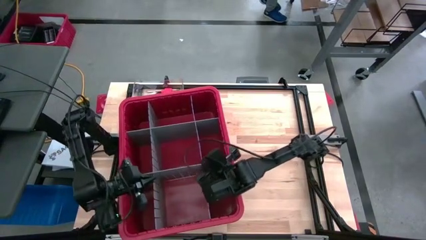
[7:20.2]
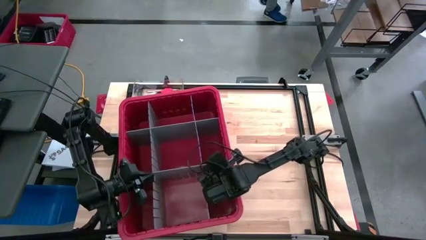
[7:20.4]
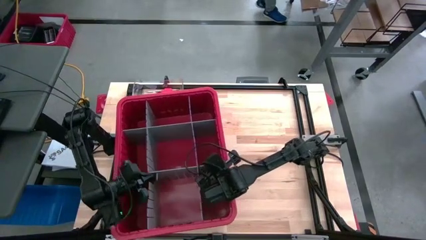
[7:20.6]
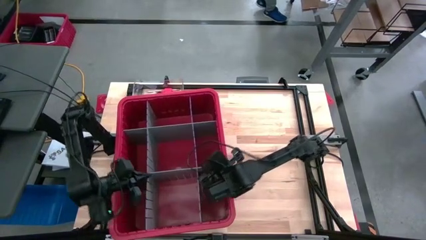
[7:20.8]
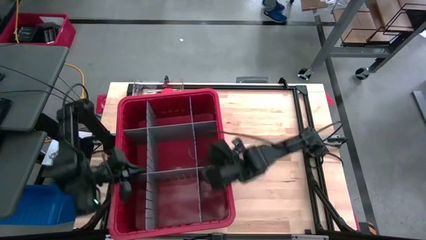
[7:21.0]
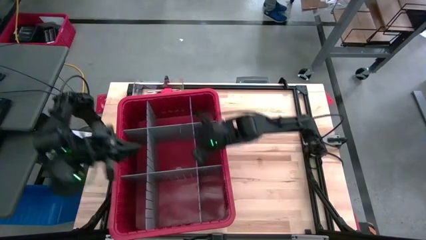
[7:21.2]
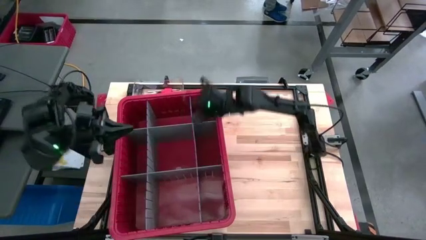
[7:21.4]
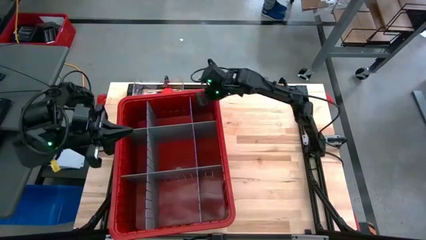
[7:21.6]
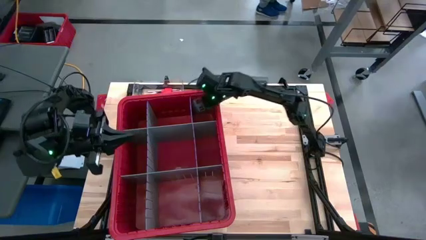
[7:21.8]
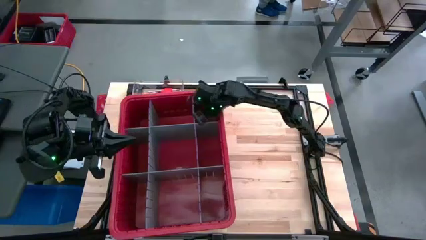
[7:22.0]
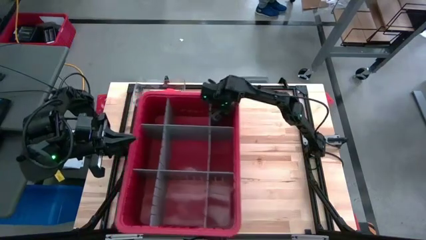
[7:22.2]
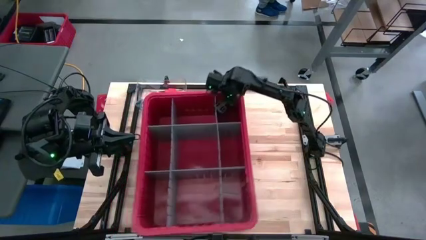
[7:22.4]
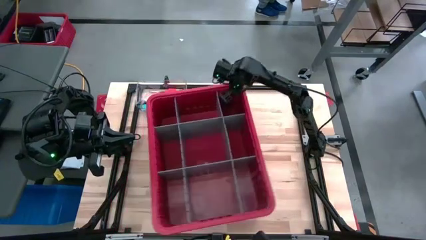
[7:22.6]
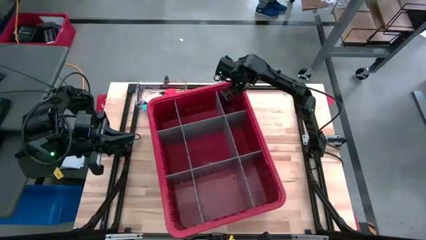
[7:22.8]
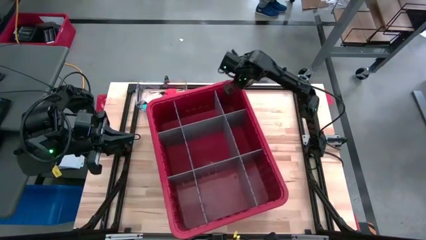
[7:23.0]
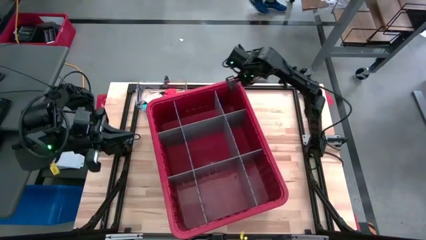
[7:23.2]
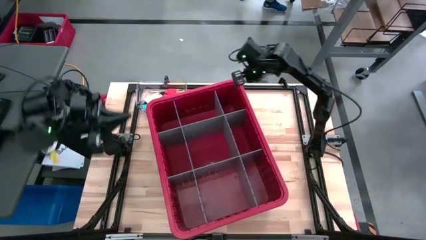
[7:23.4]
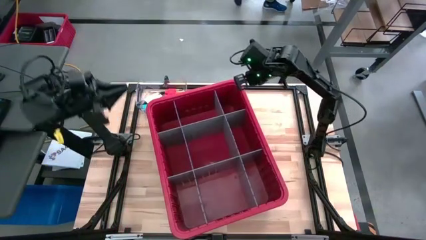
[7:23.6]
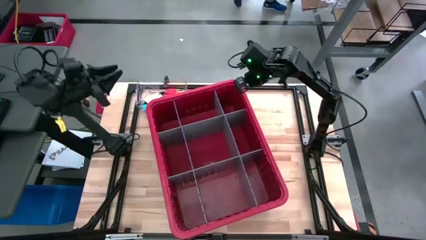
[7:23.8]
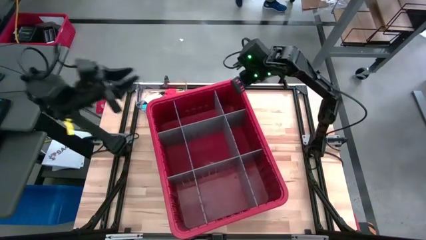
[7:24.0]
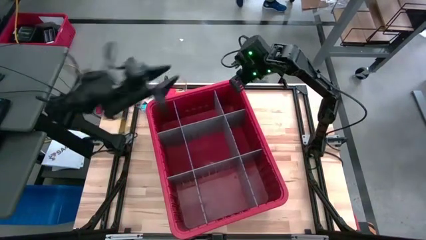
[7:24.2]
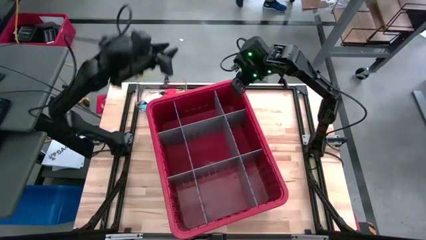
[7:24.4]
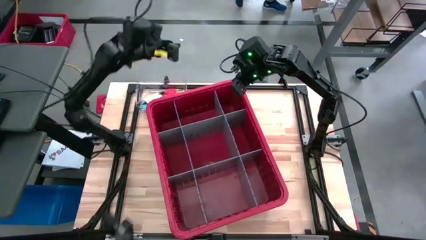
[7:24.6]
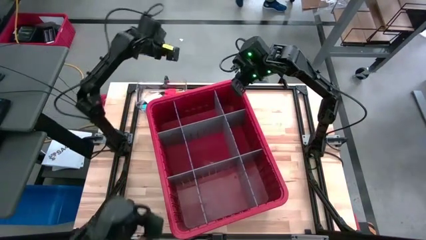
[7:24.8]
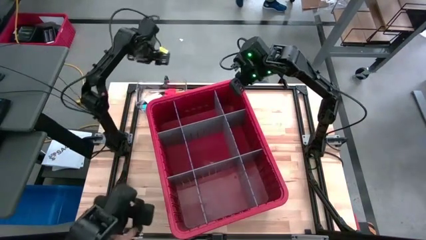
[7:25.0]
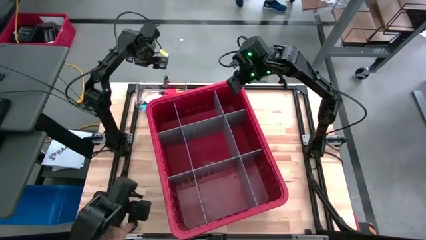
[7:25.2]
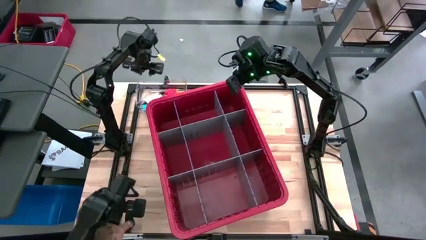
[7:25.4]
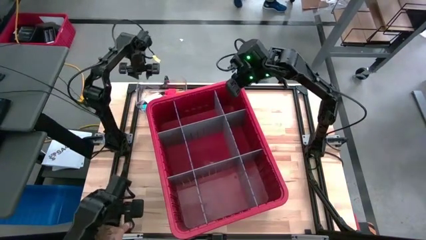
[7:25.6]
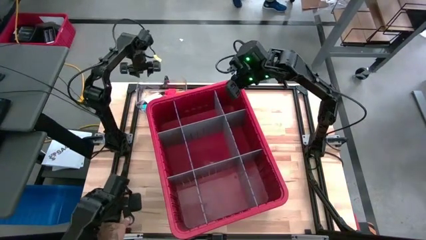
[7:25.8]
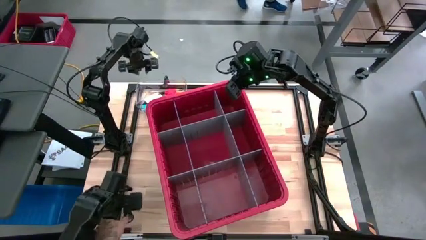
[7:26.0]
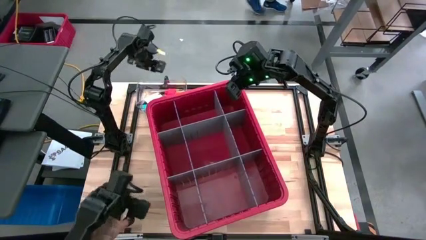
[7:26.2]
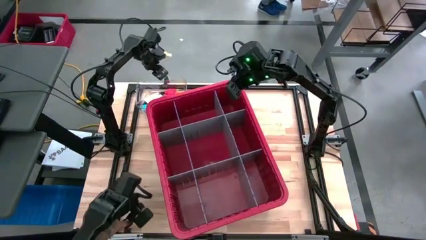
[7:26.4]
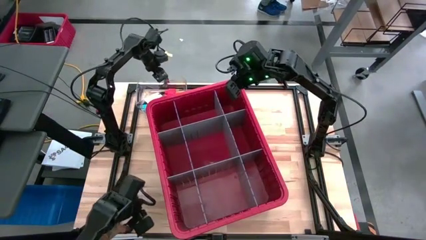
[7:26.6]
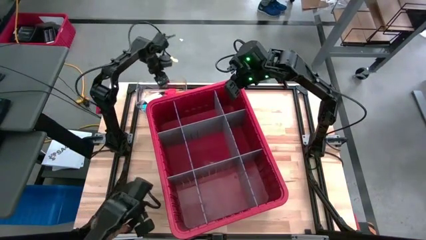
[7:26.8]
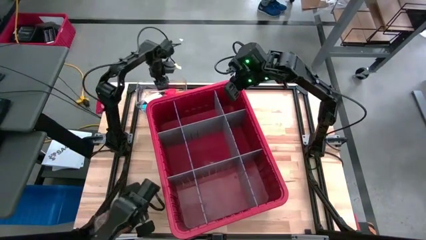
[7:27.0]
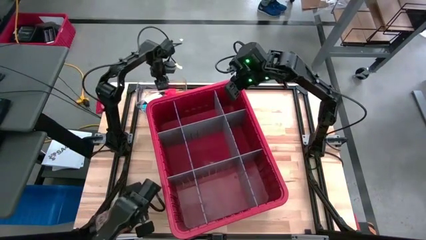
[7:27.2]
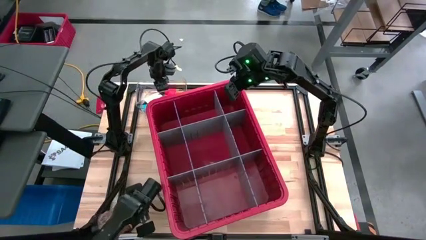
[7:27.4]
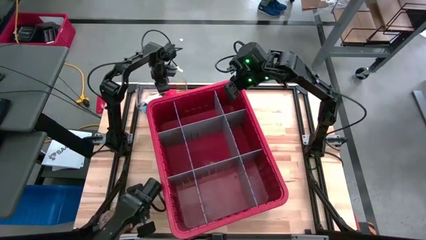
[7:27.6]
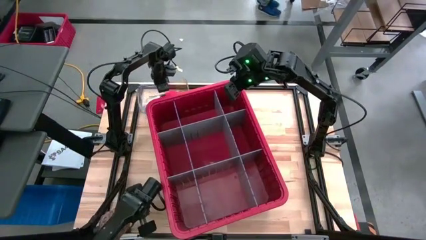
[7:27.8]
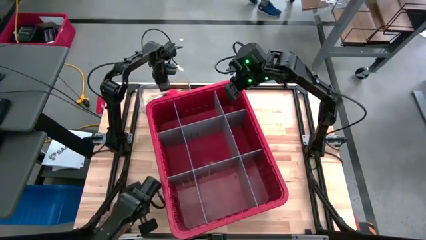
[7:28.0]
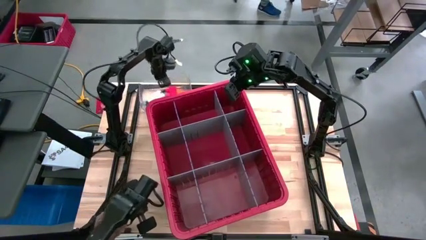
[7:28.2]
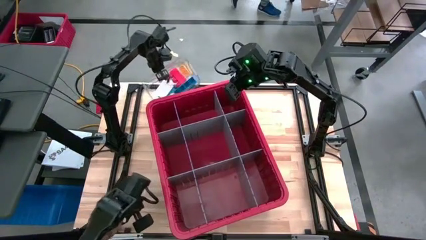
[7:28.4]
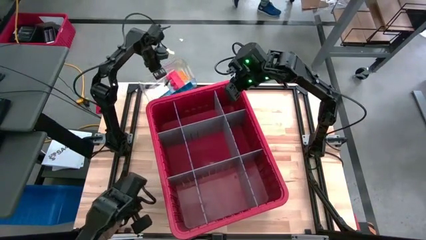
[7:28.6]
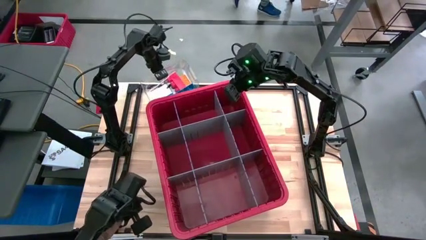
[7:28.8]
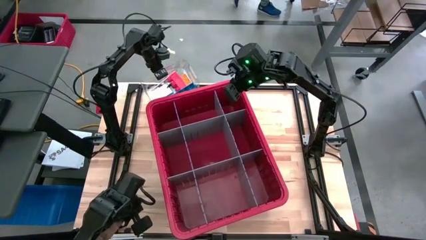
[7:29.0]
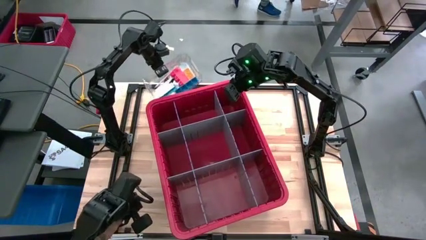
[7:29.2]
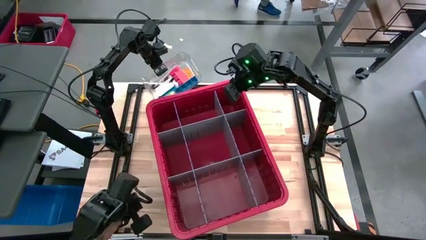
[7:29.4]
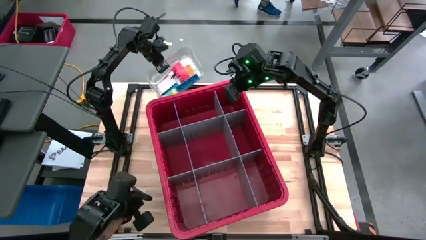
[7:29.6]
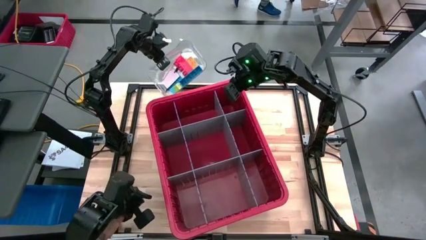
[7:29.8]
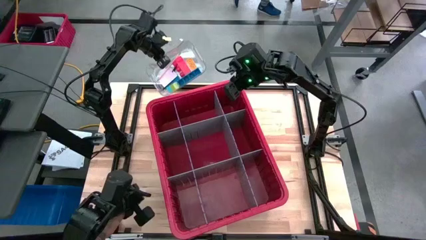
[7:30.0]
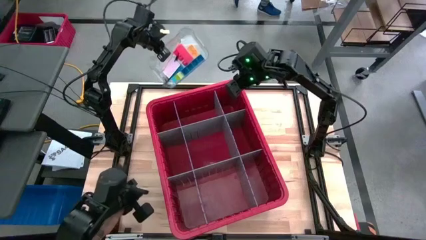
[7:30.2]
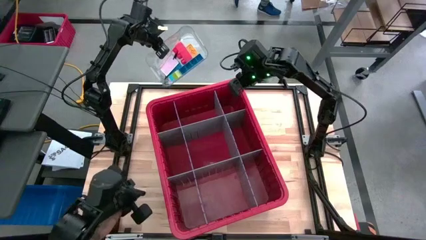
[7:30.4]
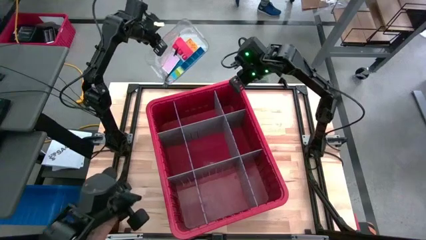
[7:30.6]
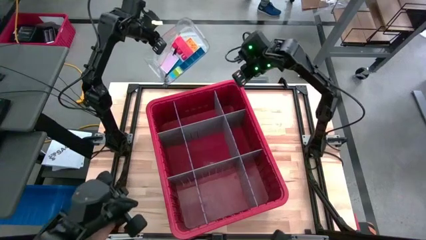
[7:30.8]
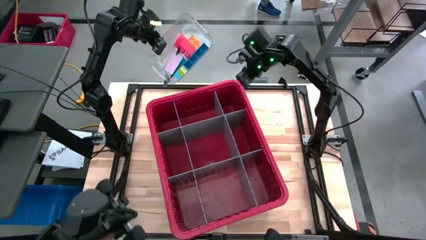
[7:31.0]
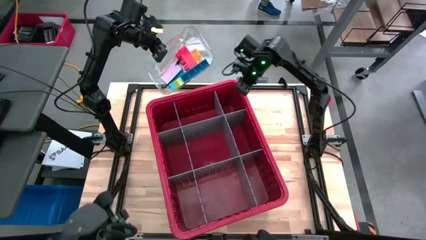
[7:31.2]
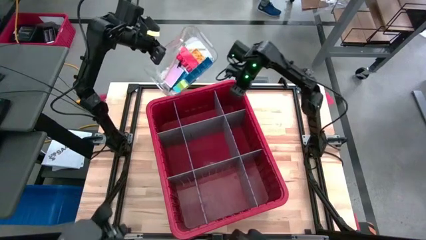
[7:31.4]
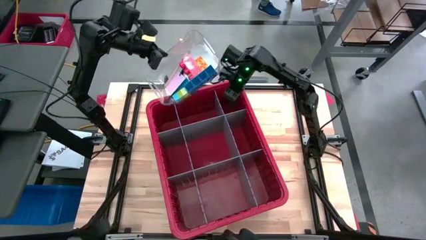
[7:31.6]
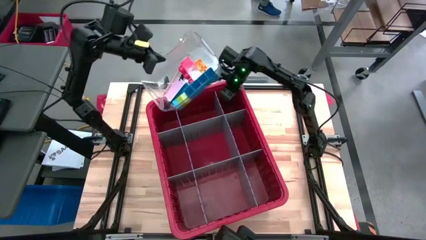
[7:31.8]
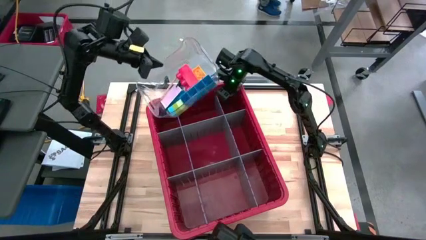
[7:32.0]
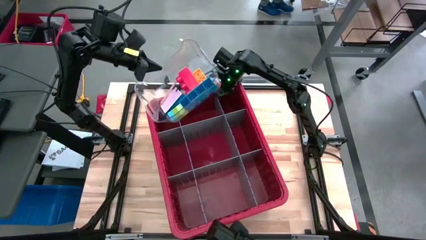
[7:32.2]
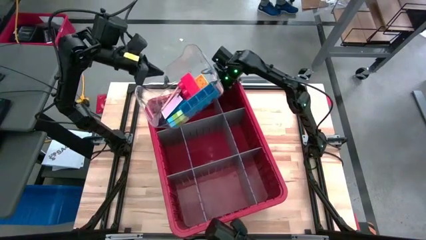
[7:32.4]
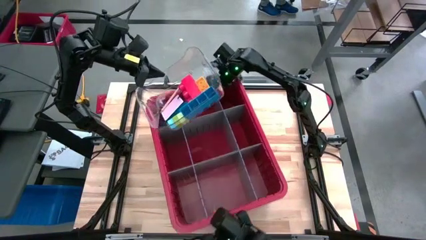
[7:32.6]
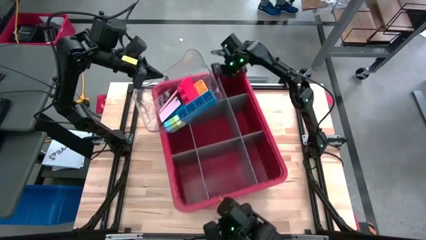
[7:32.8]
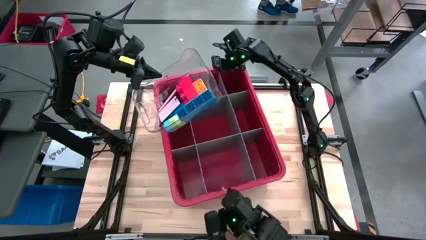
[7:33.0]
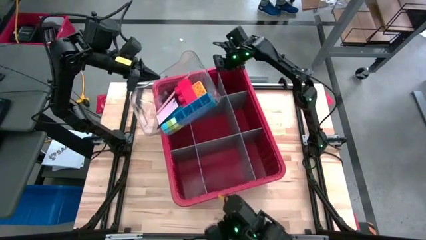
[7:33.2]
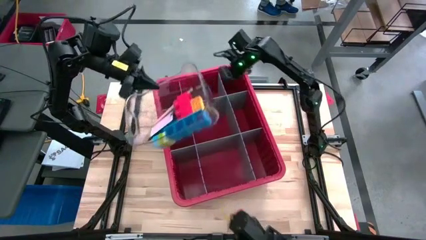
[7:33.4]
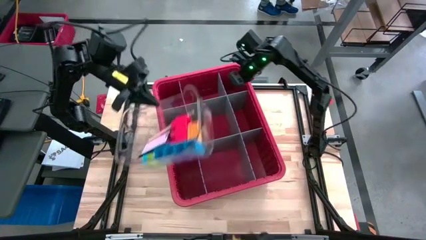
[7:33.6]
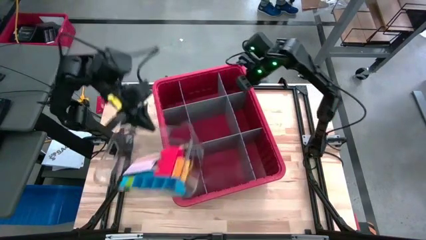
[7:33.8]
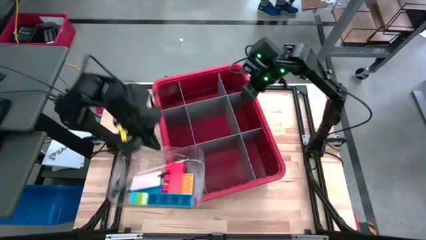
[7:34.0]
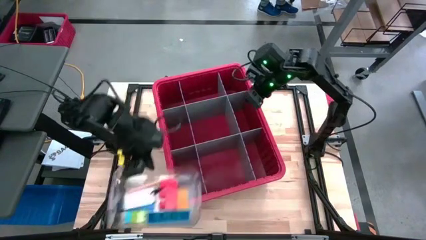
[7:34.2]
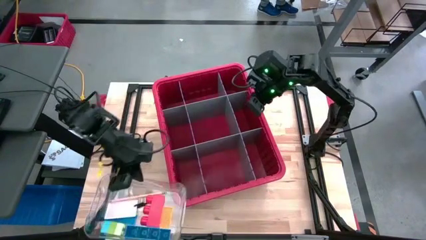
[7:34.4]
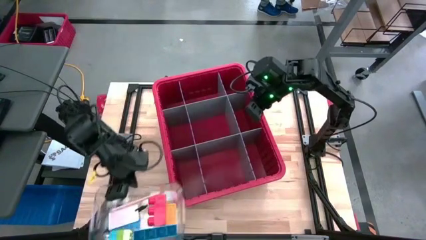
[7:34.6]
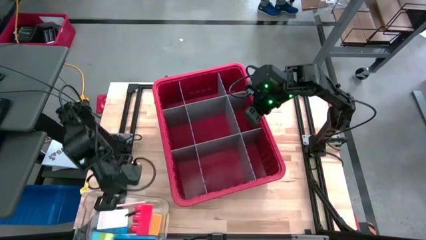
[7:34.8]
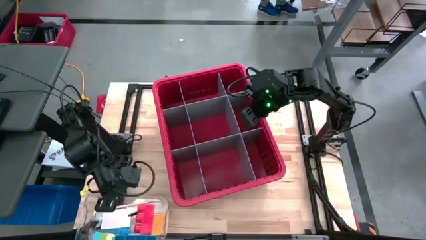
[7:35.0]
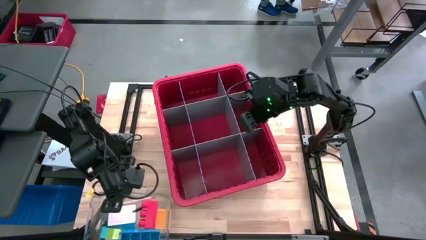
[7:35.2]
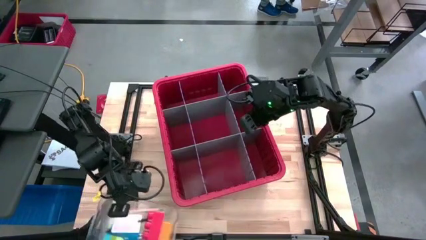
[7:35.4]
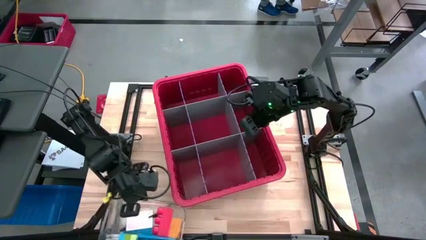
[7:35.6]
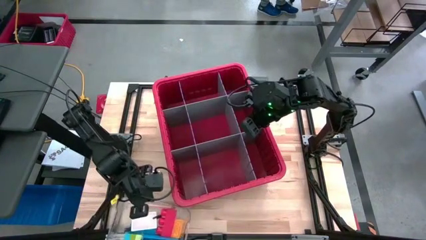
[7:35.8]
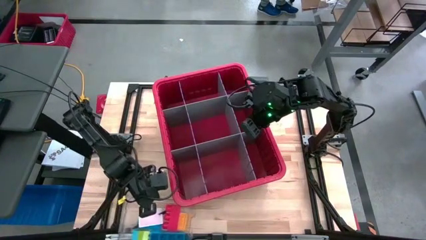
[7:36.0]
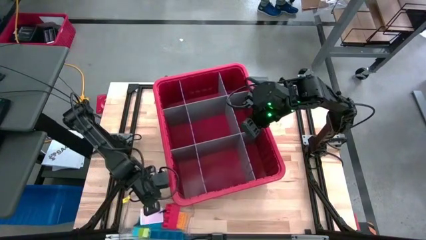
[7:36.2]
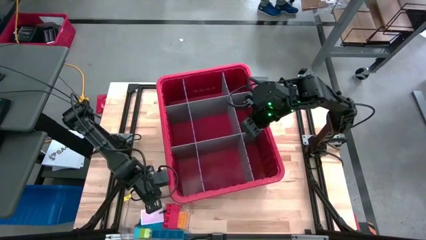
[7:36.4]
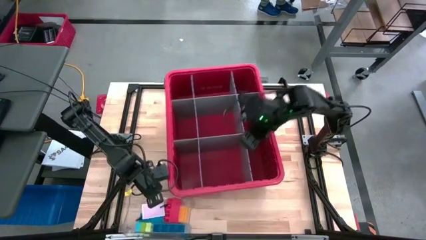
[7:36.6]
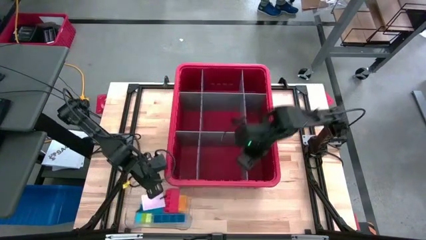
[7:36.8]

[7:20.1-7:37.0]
Task: Sort blocks
Move the transparent bin from the top left to the bottom left
